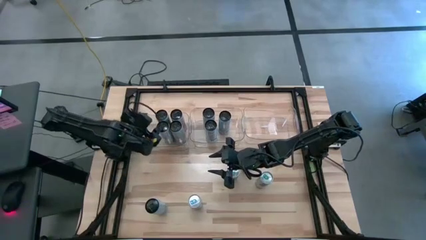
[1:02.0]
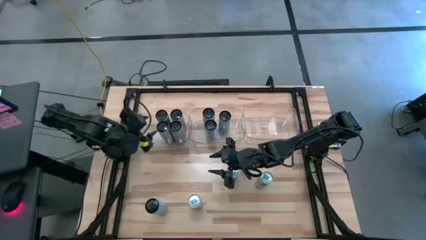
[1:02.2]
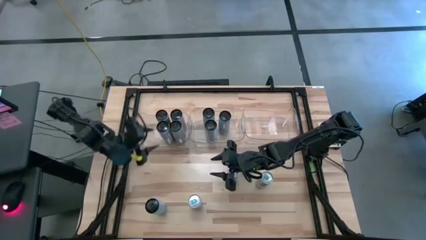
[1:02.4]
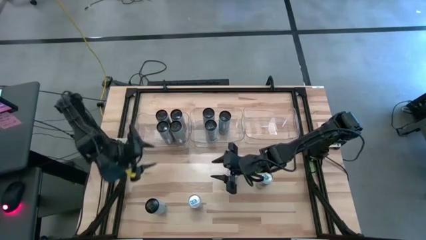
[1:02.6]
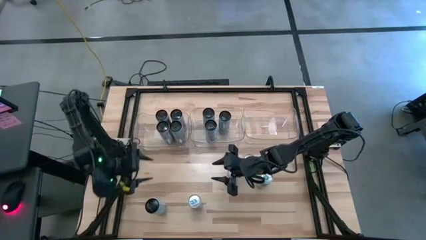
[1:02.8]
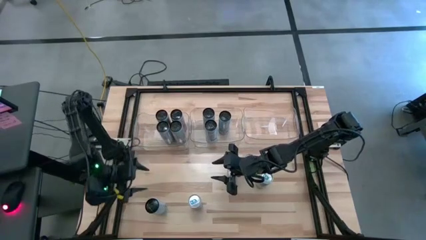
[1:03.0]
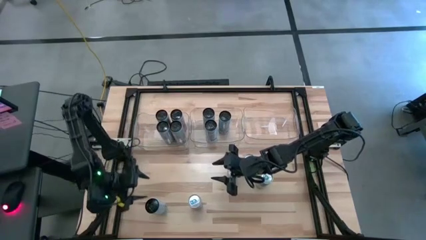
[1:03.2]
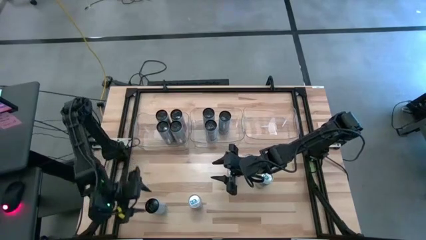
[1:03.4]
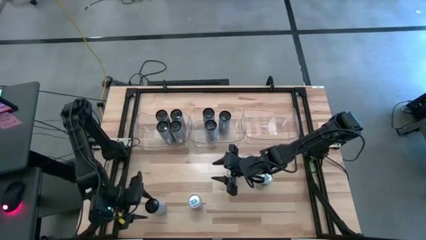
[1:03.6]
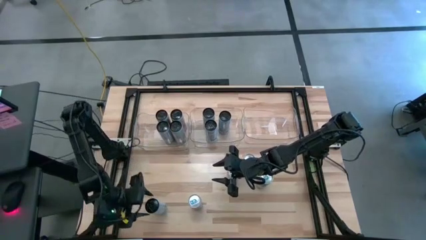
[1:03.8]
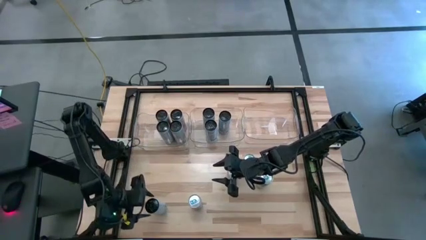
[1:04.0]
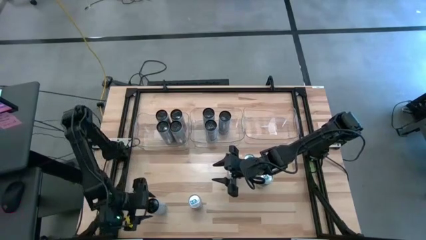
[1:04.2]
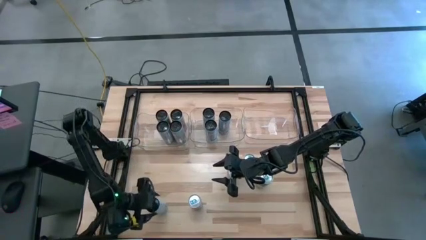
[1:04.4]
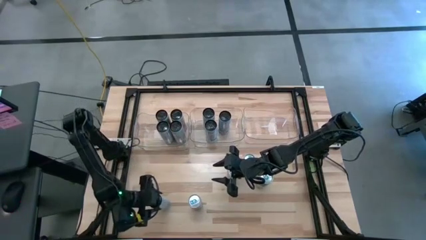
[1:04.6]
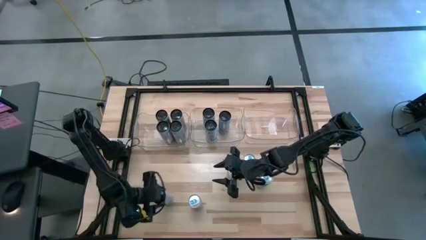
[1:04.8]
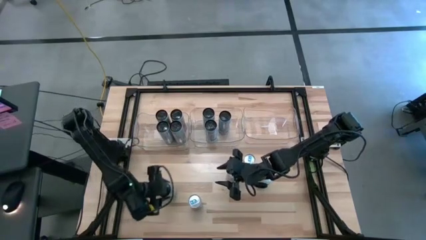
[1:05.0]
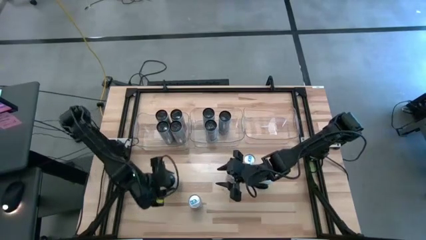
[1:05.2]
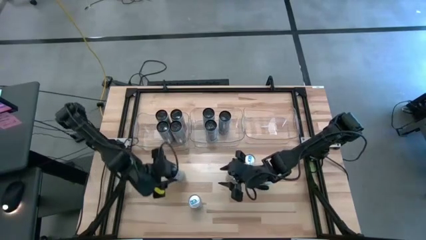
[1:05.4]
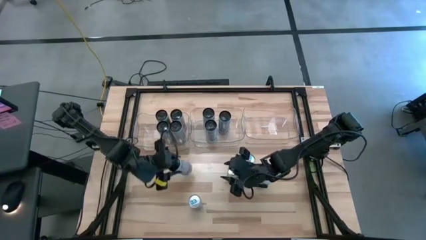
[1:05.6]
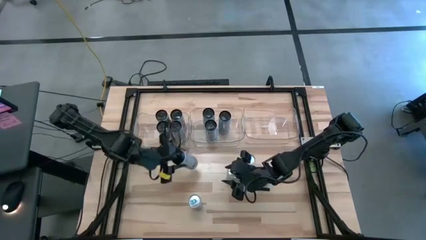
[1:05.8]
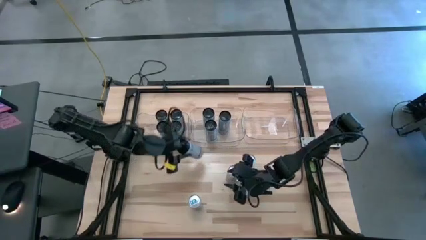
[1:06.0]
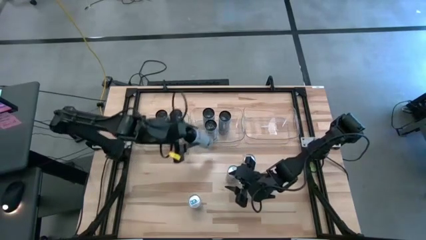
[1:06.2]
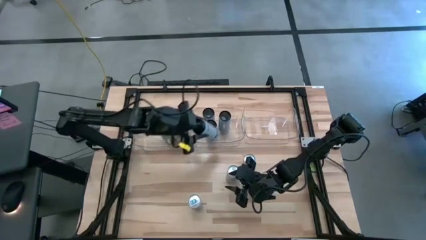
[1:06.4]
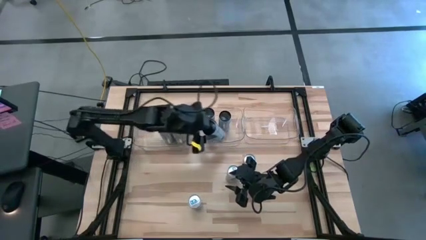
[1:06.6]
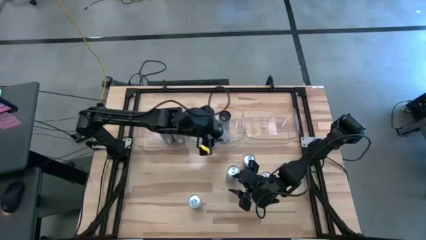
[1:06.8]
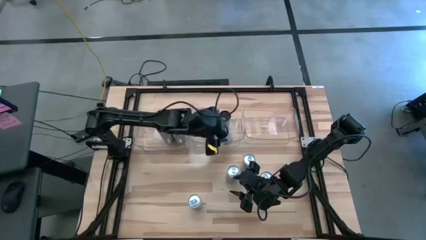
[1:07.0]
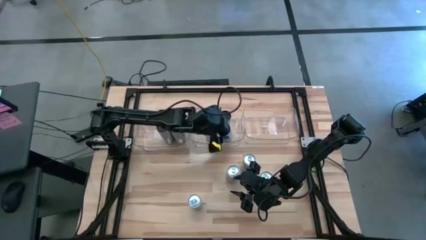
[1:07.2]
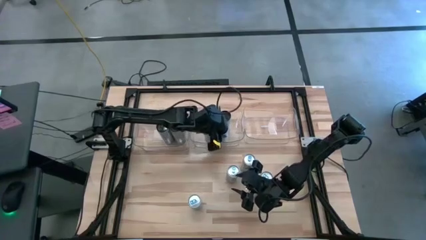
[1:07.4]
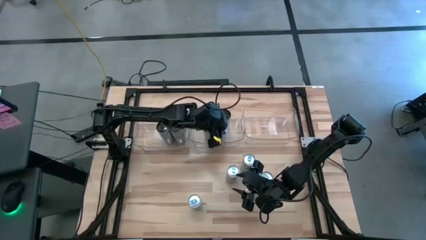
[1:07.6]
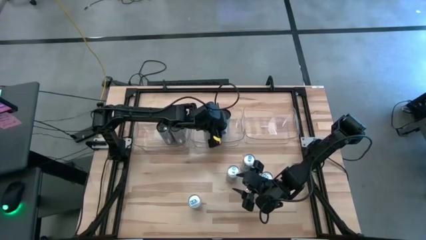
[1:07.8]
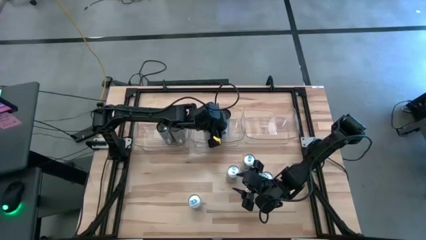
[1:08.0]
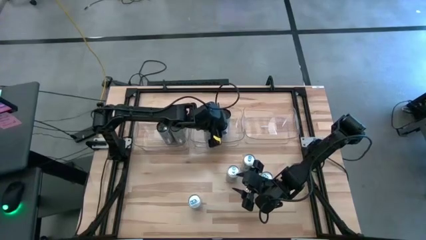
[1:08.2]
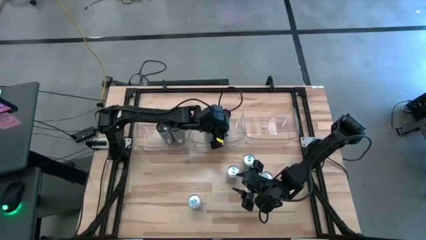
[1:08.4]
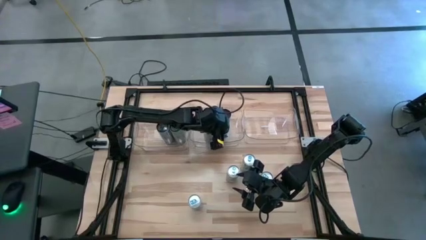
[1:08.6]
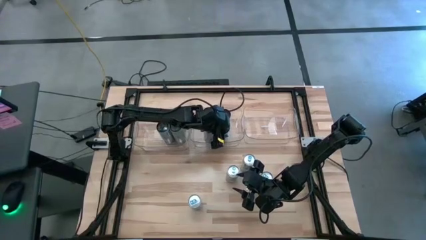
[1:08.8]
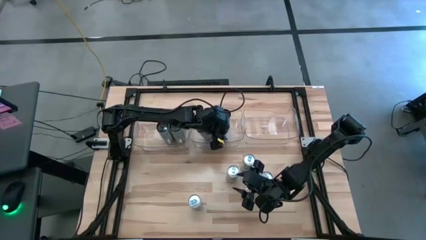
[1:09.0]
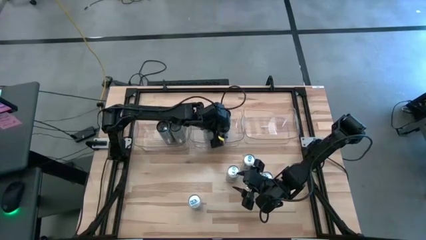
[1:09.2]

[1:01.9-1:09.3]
Task: Sort soda cans
Put the blue soda can into the center transparent bin

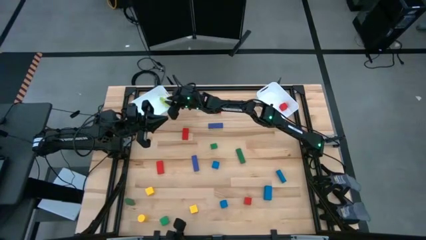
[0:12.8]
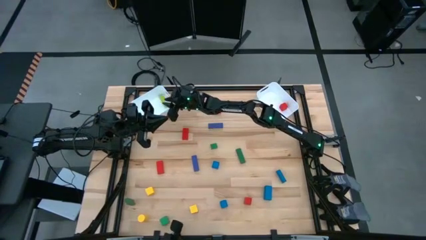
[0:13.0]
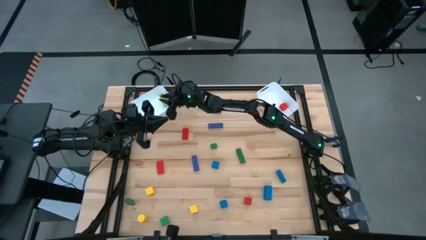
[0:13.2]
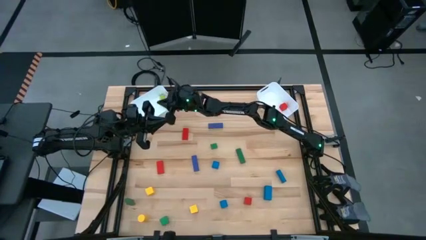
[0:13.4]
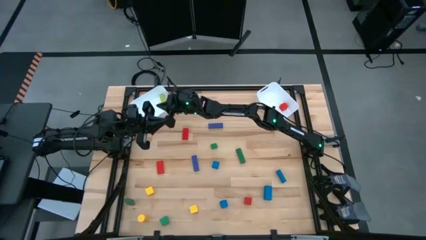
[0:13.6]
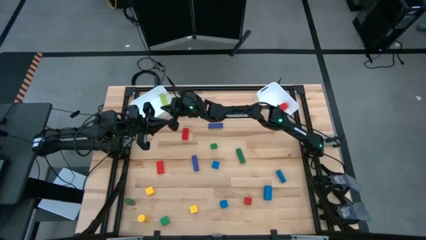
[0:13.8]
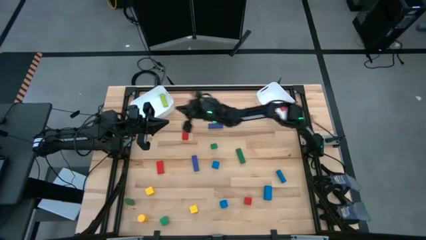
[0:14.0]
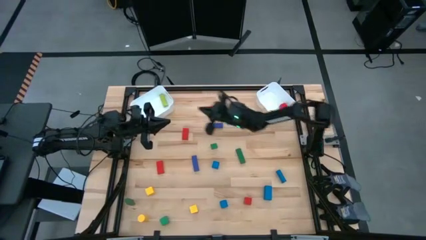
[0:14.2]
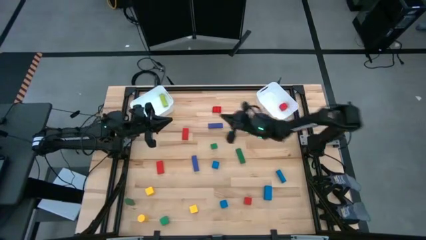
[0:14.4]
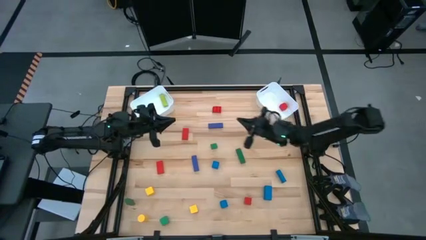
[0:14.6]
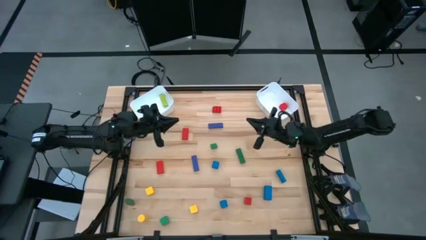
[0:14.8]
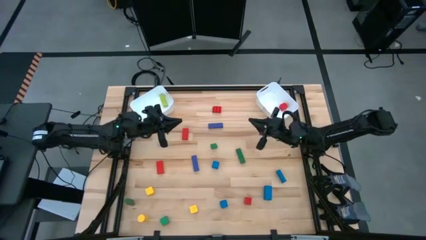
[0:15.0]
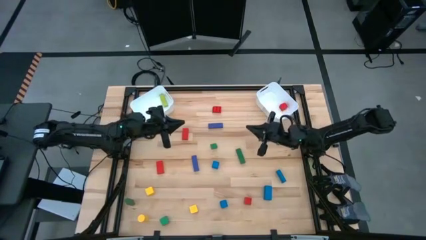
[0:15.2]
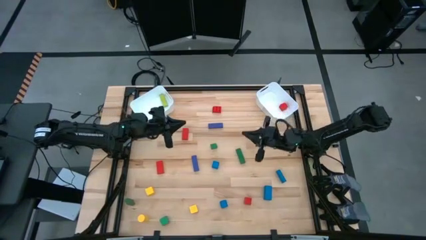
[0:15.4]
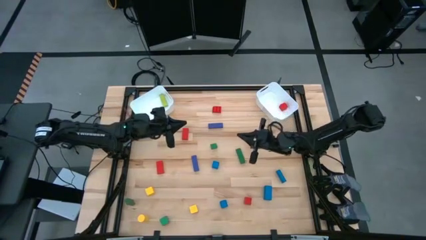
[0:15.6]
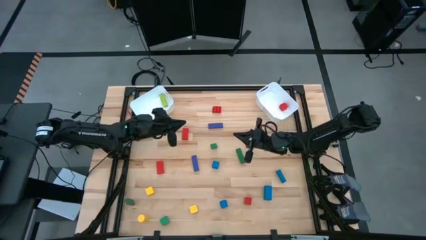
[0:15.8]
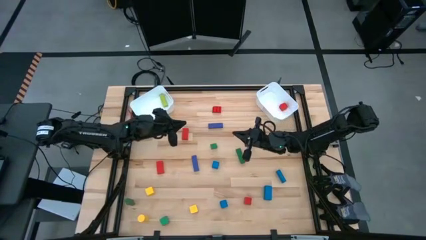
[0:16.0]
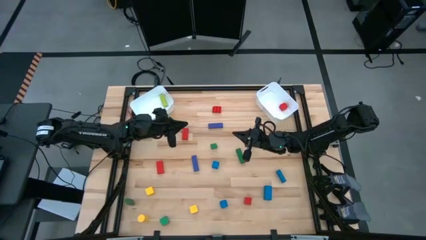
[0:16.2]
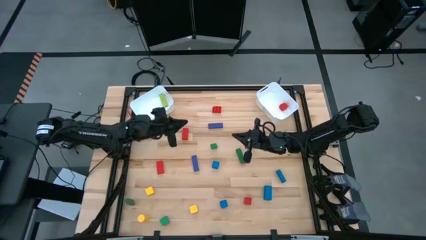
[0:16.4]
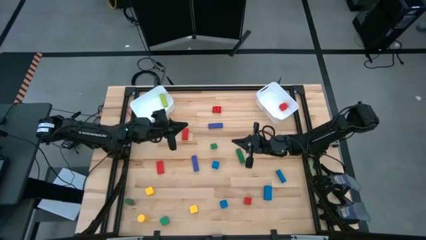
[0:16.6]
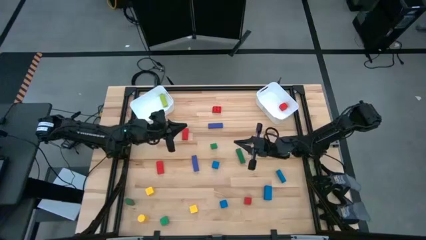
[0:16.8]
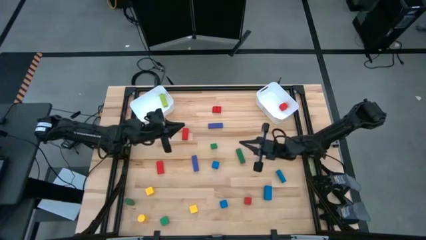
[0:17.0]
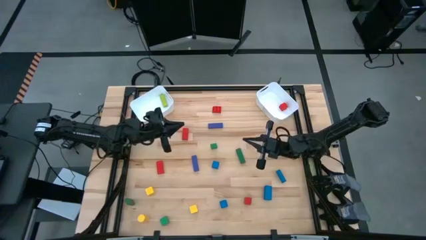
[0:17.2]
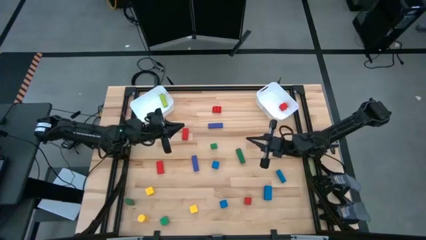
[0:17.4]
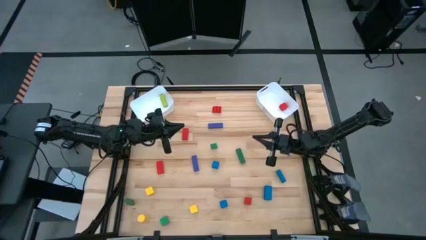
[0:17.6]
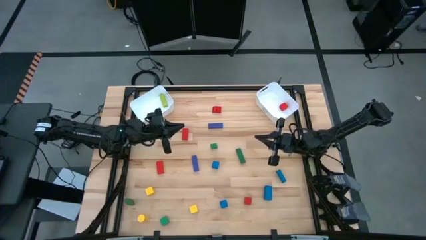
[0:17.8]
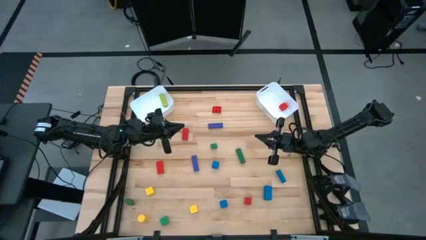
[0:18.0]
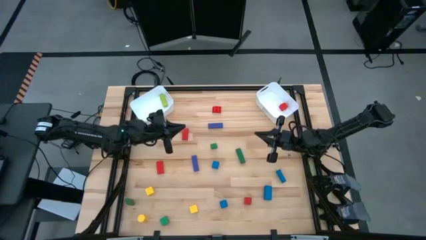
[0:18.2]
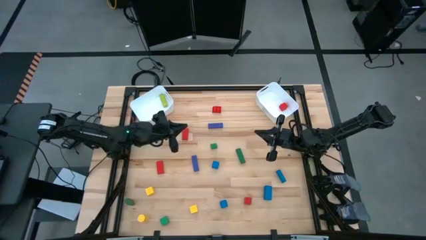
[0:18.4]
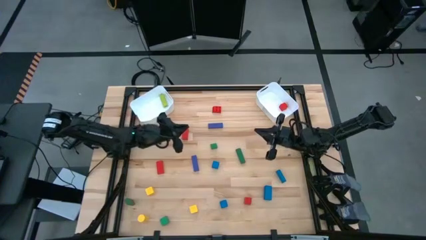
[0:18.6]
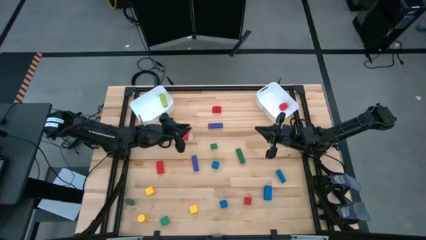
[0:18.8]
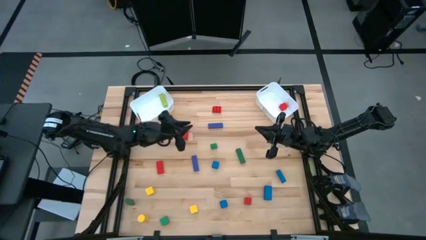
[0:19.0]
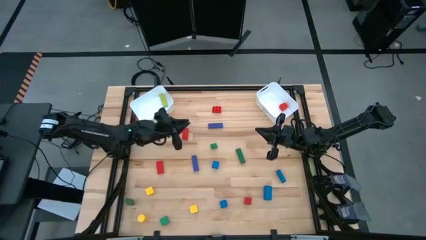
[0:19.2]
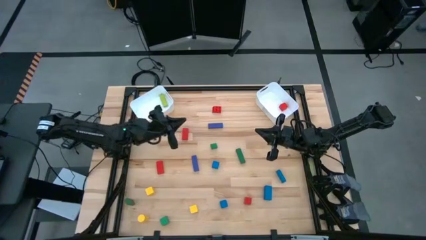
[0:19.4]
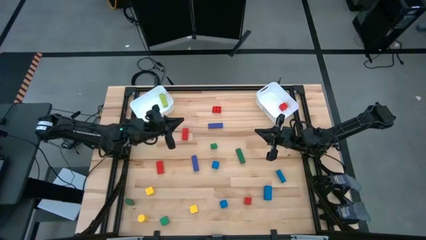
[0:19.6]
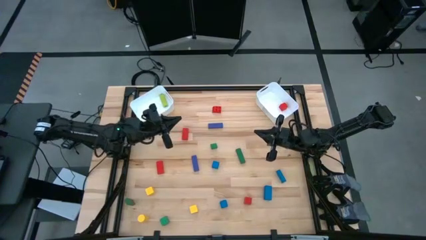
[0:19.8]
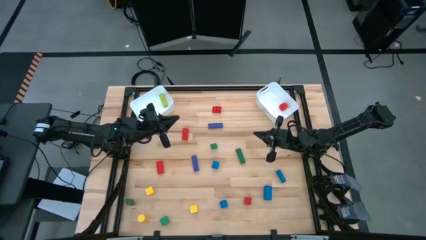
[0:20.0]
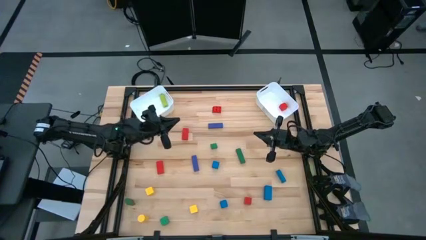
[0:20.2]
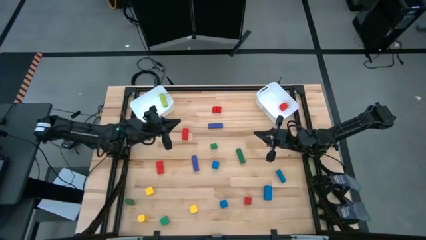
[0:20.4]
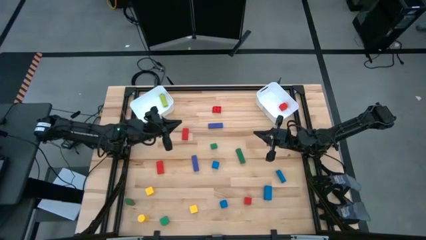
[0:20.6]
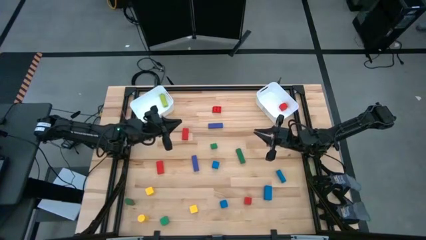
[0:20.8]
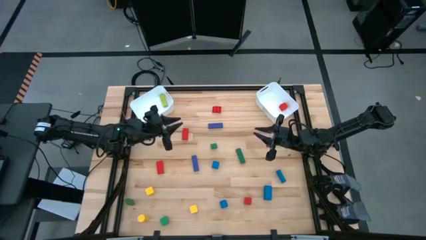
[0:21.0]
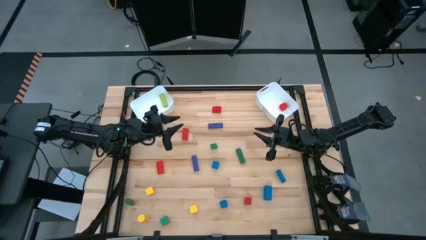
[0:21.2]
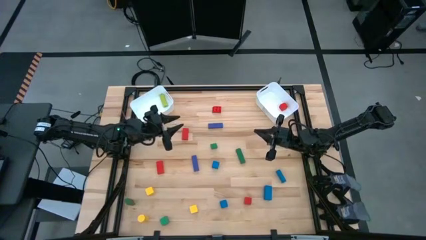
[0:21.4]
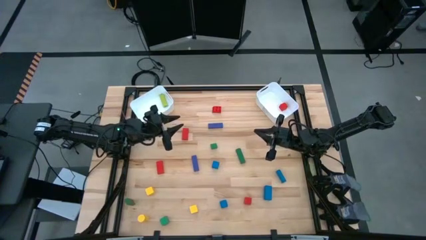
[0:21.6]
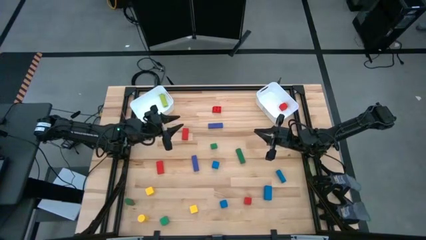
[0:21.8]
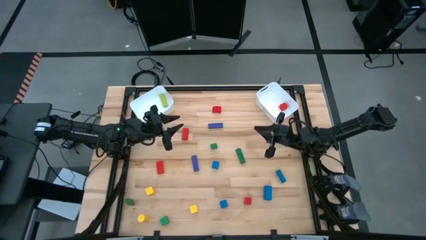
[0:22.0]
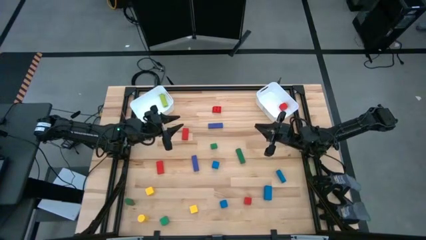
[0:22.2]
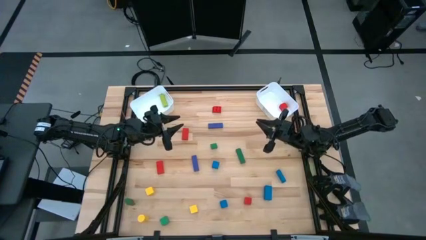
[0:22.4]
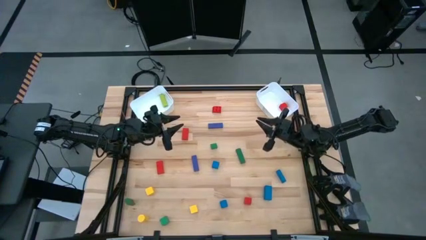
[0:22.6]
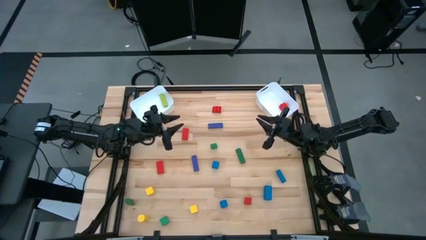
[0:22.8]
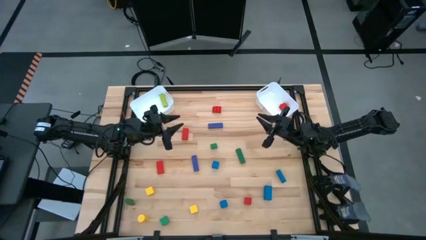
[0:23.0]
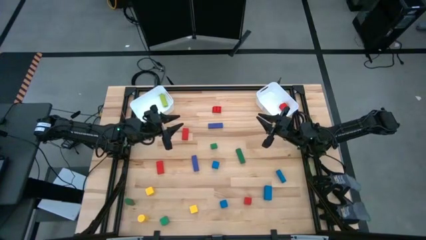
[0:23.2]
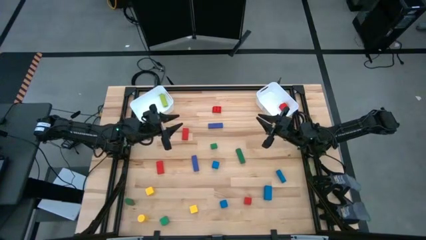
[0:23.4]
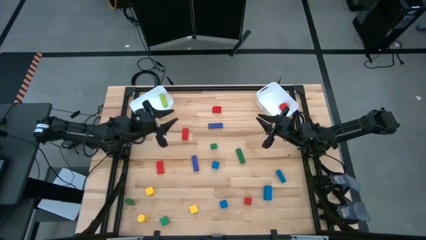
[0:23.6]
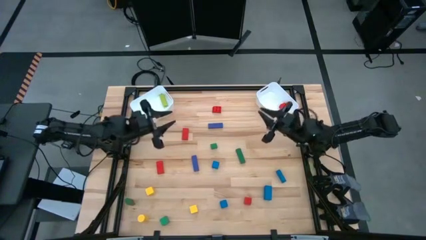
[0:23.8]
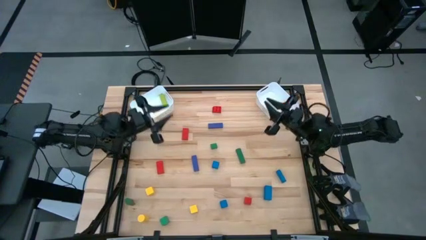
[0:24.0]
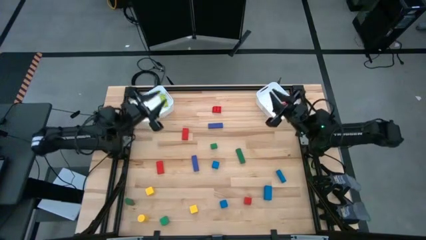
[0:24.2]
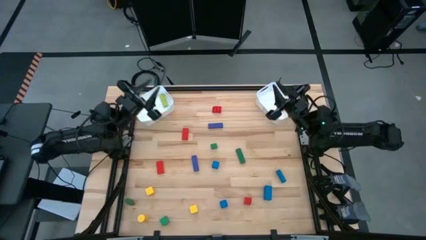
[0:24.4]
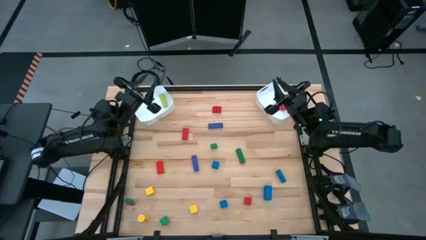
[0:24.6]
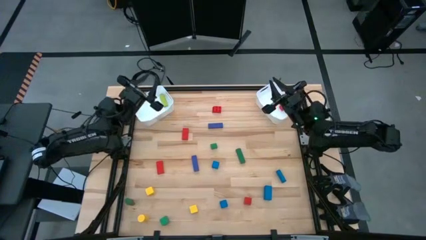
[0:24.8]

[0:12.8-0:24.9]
Task: Sort blocks by size
Put the large violet block into the left white bin
